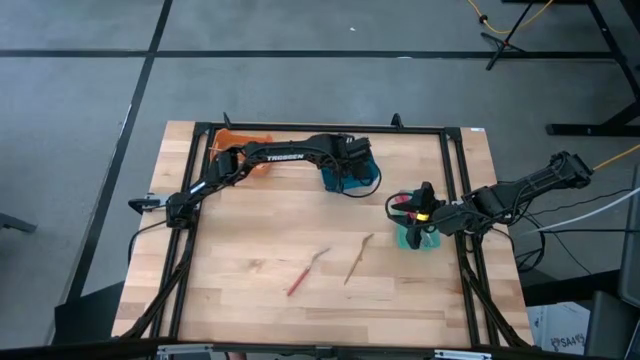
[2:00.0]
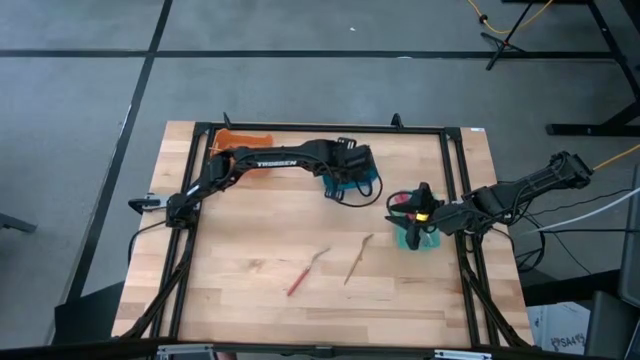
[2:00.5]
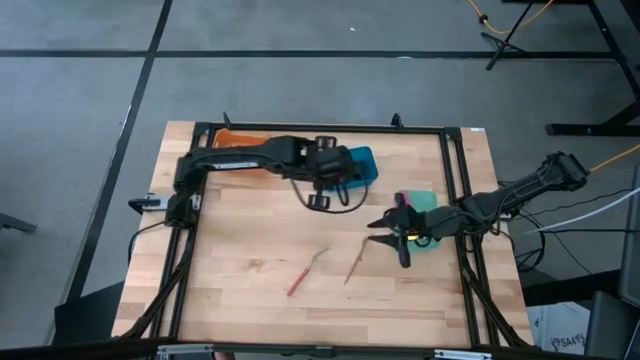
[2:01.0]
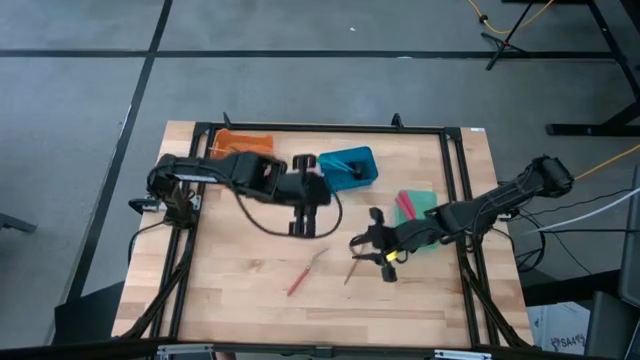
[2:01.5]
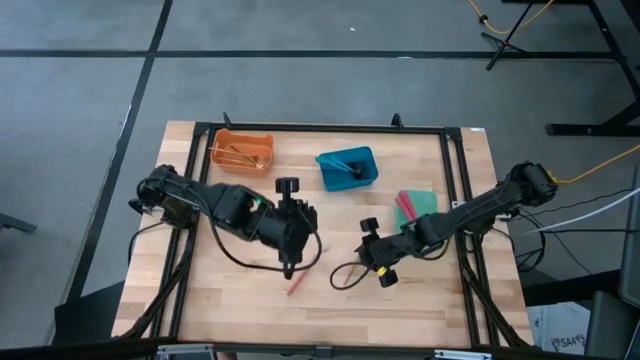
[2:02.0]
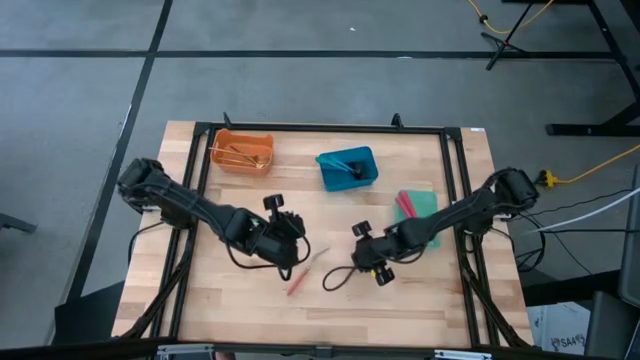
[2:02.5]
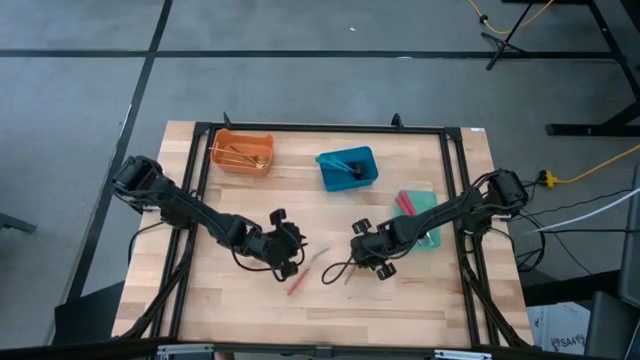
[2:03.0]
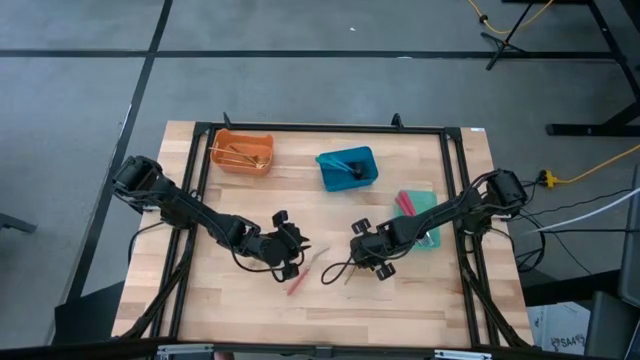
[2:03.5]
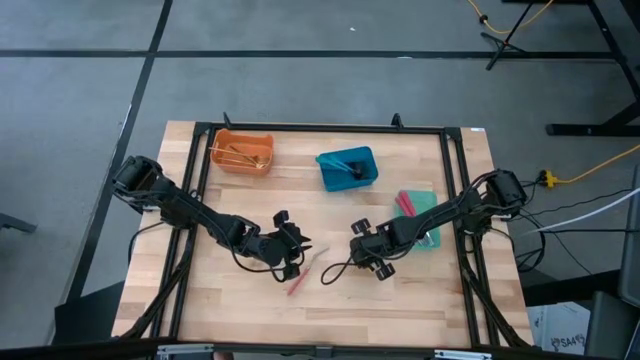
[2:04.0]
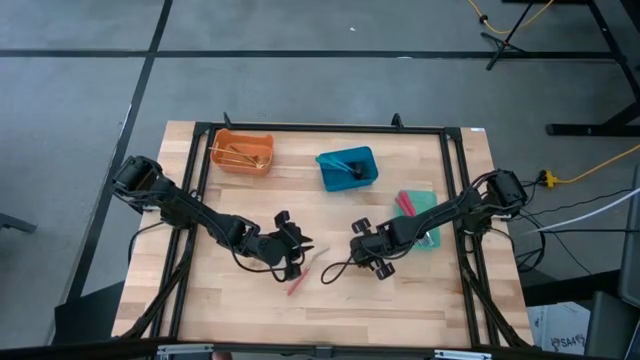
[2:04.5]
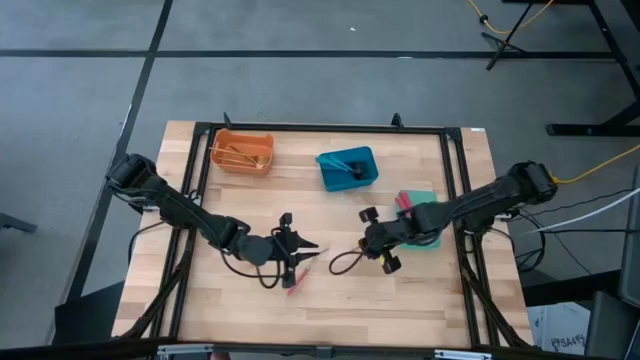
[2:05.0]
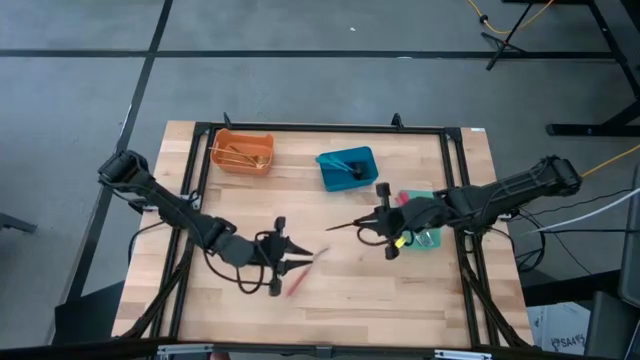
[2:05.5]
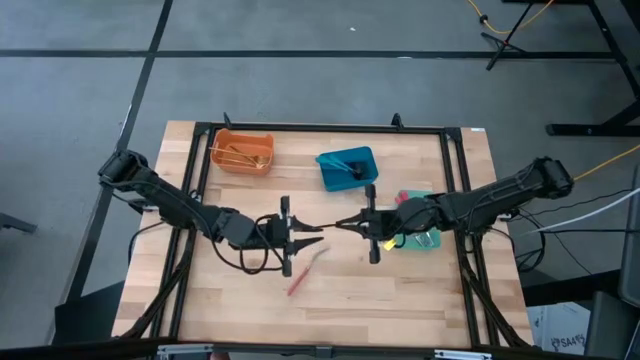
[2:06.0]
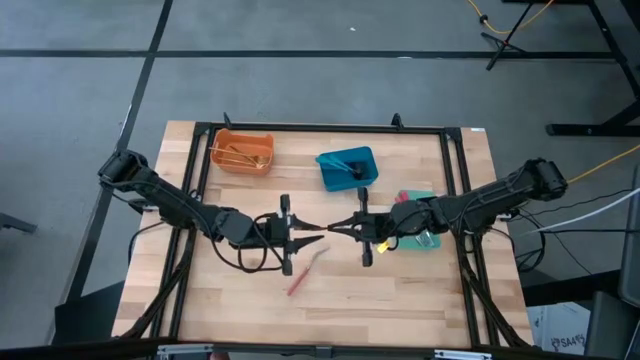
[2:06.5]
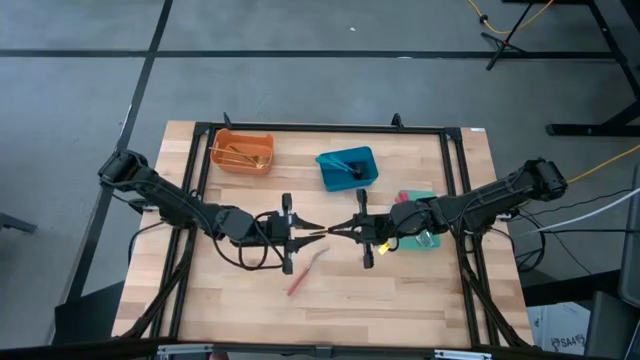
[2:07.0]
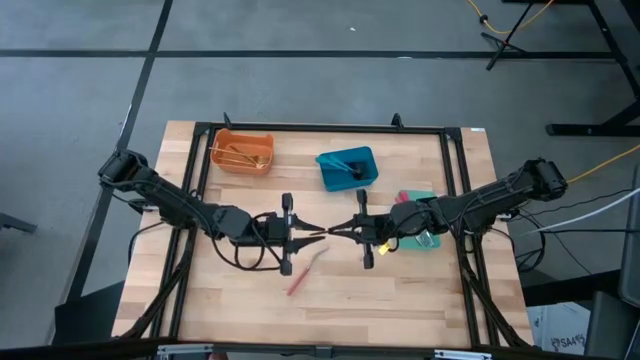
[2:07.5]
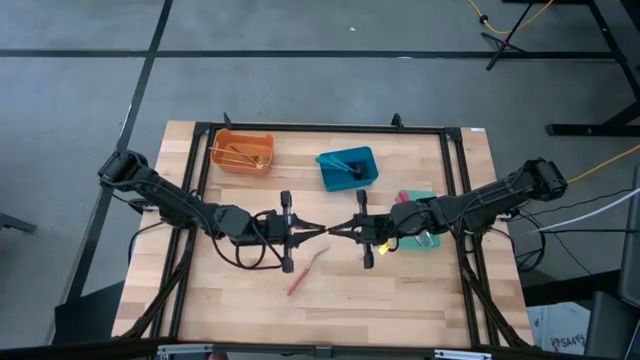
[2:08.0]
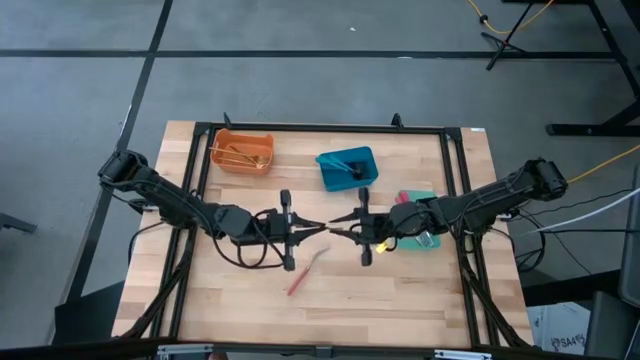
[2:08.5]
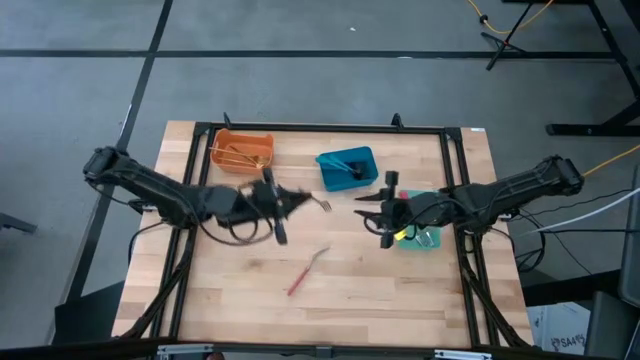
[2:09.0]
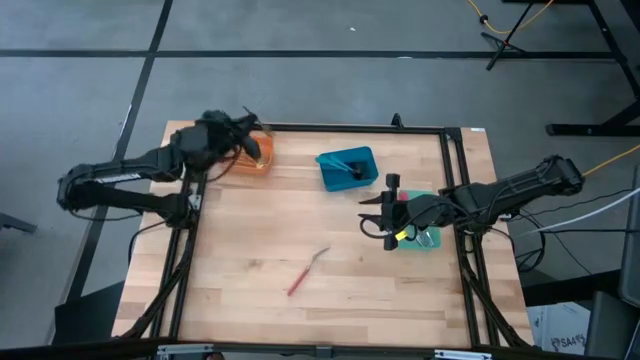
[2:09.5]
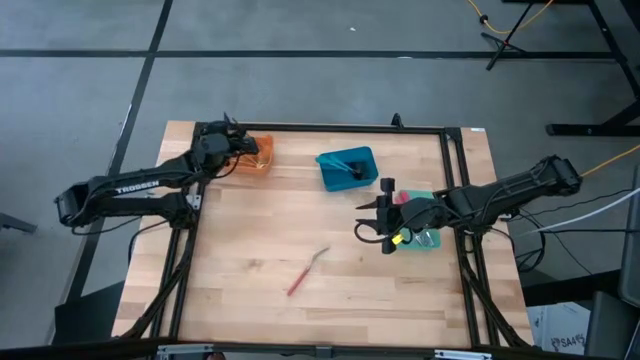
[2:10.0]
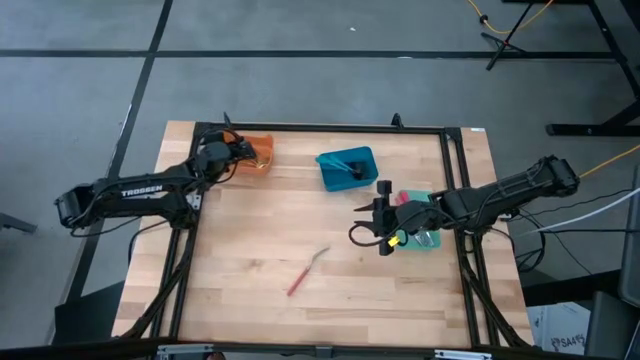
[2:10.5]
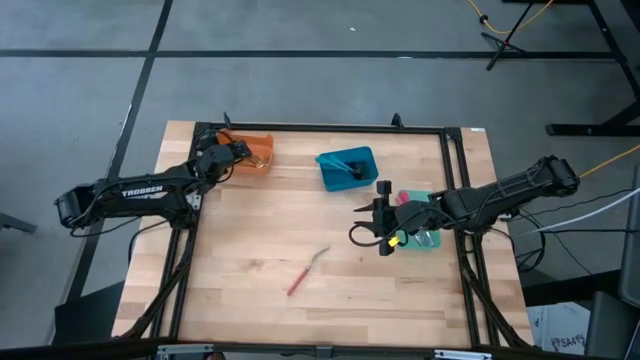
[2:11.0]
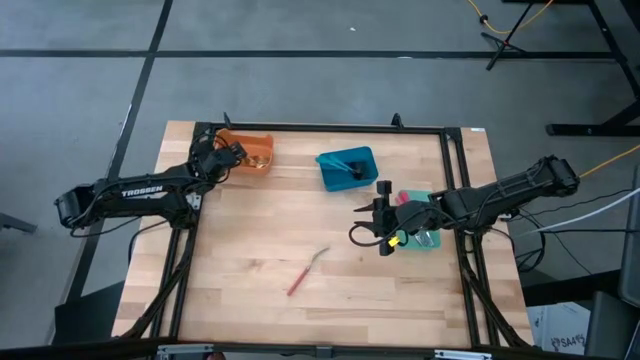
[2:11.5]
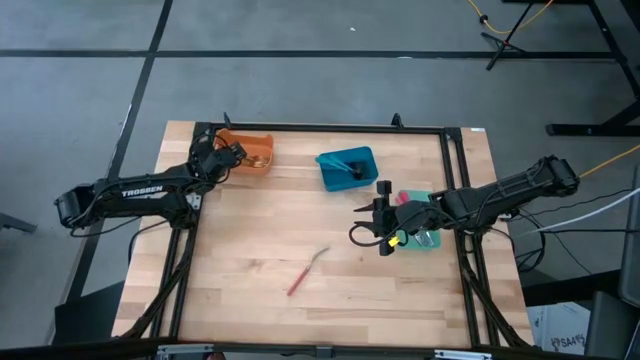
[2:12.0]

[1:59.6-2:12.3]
Task: Sort silverware by color (type)
Put the gold fork into the orange bin

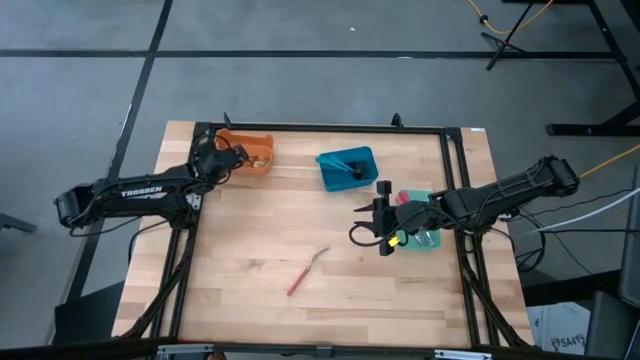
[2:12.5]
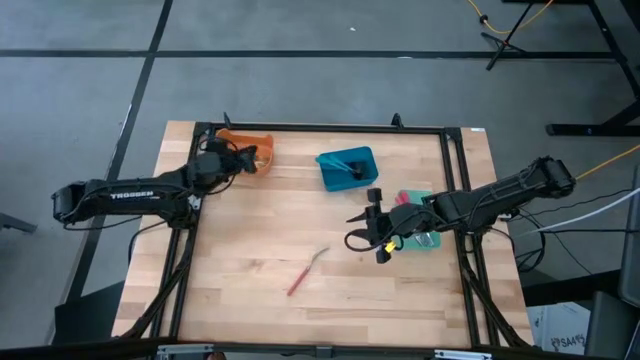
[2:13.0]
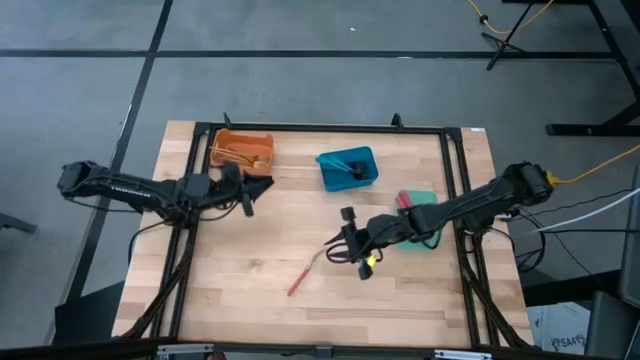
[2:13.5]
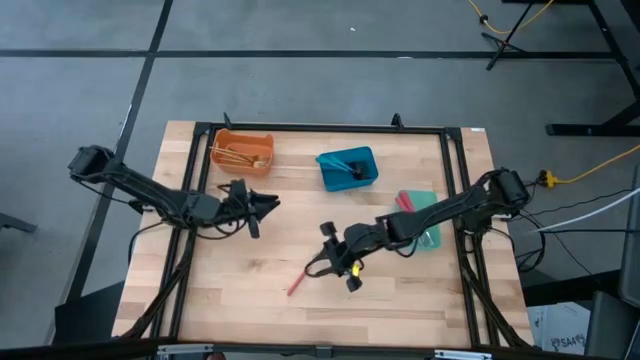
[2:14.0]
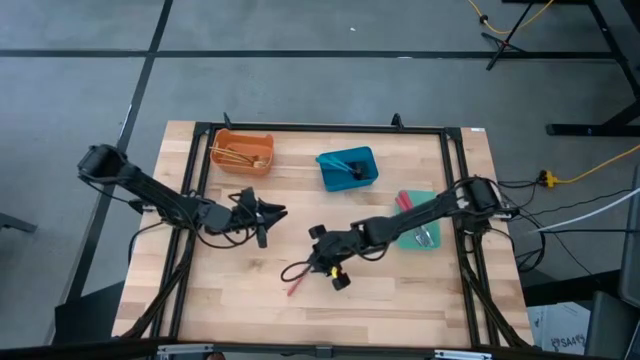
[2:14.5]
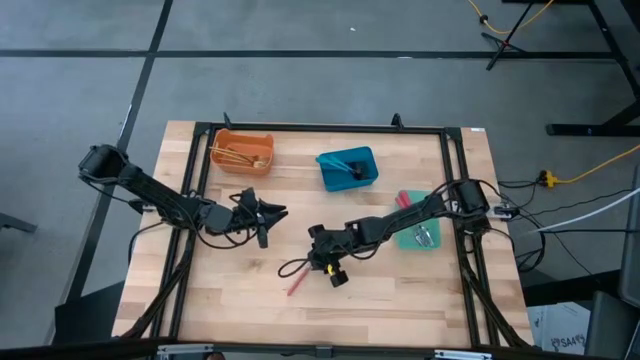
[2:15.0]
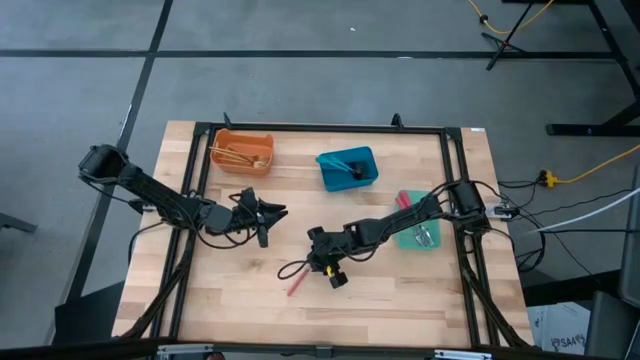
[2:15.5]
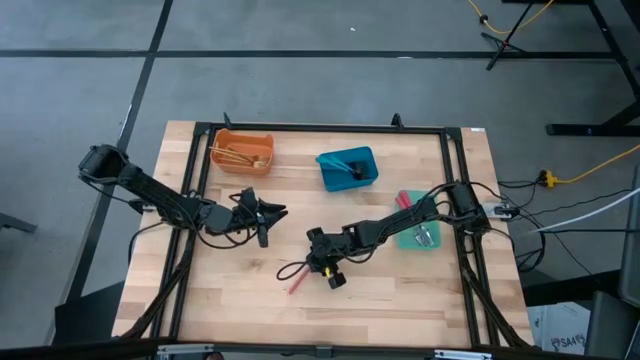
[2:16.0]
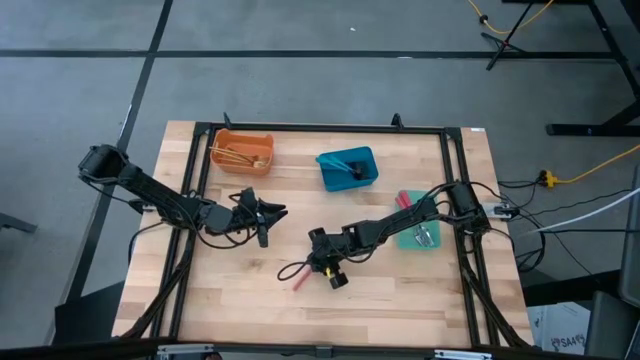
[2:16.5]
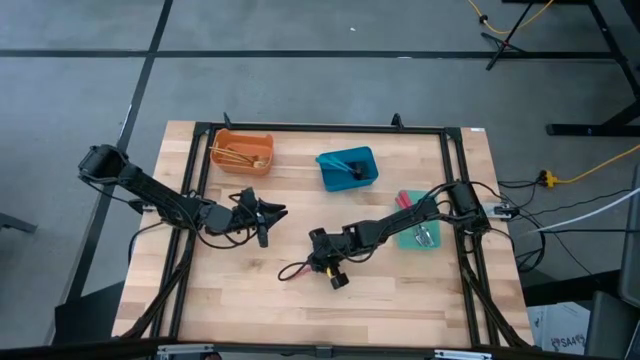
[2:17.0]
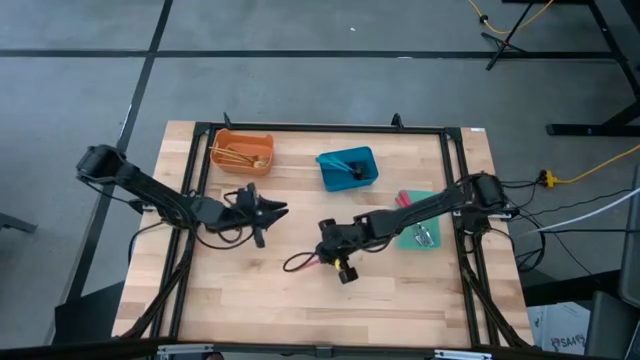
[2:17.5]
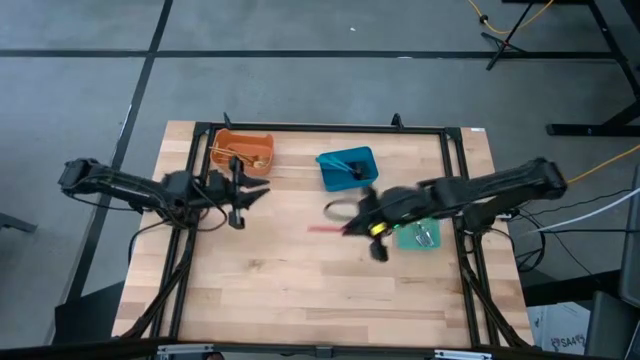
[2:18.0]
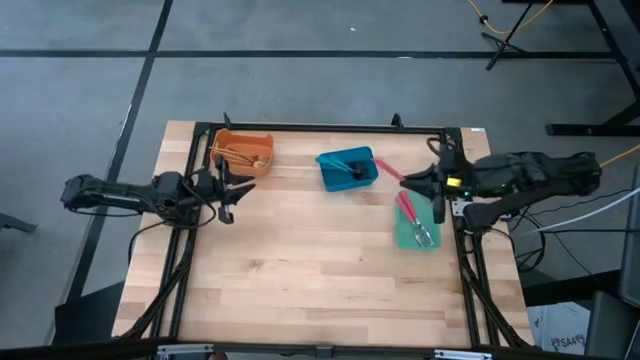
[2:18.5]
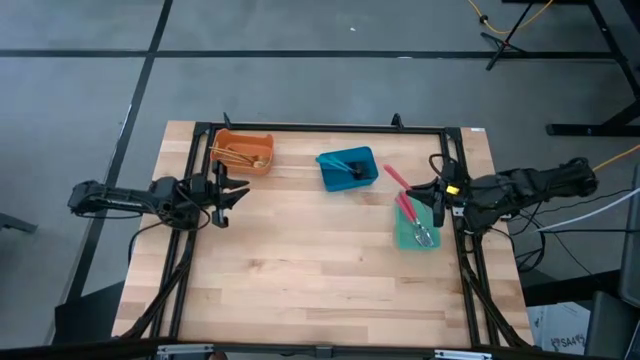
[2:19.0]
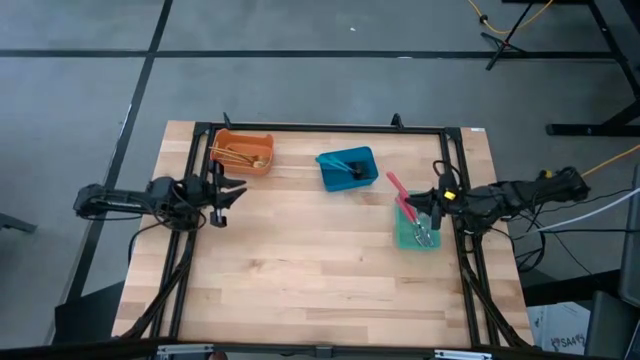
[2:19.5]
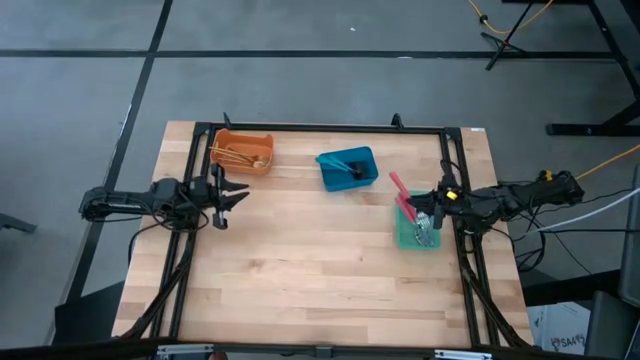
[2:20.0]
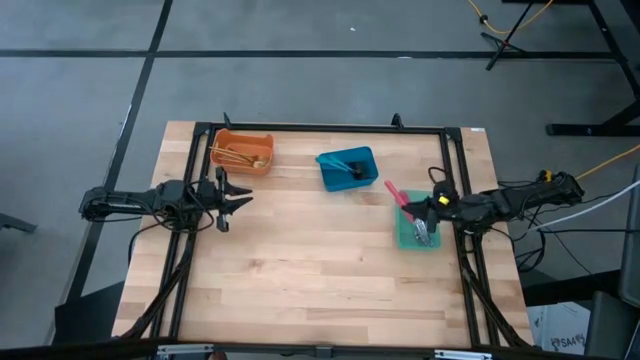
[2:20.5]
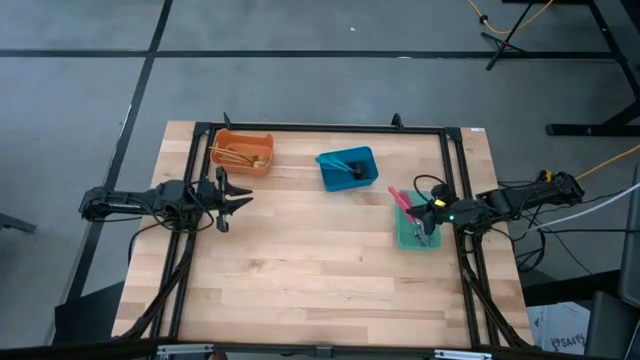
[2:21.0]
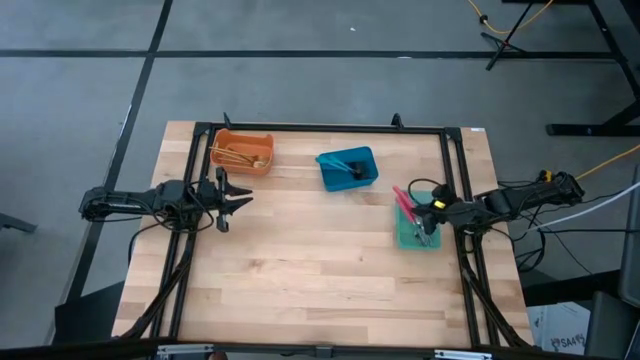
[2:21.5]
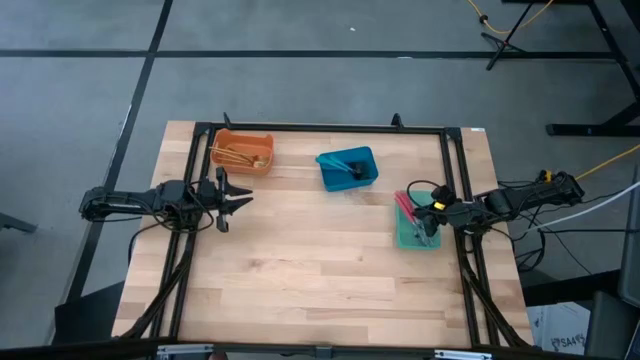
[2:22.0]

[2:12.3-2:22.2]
Put the pink fork into the green bin
